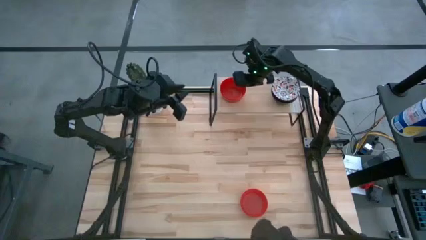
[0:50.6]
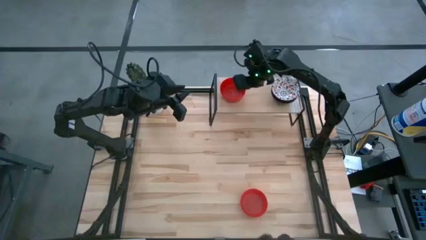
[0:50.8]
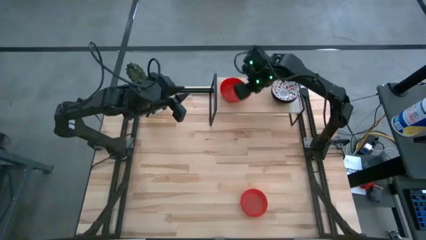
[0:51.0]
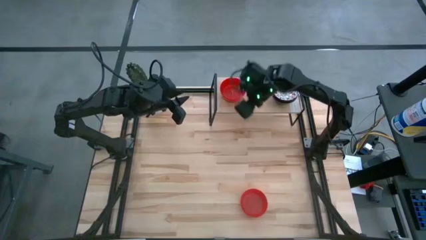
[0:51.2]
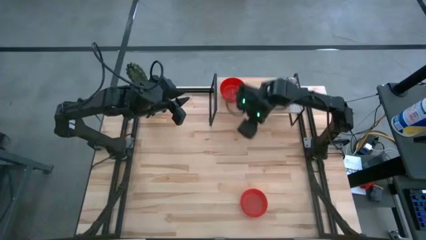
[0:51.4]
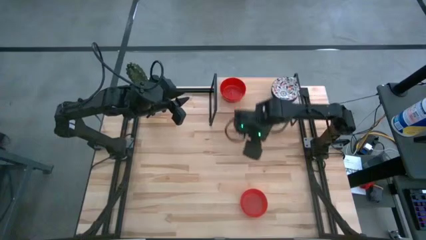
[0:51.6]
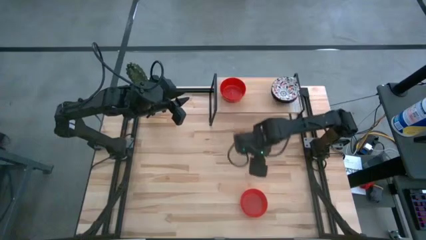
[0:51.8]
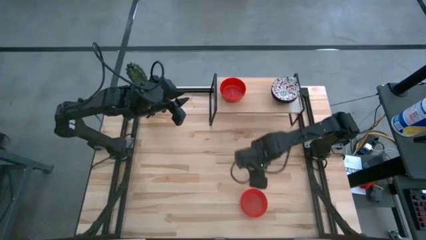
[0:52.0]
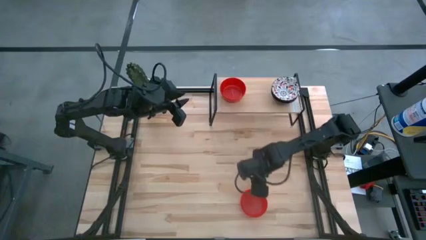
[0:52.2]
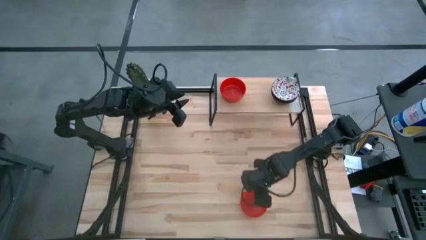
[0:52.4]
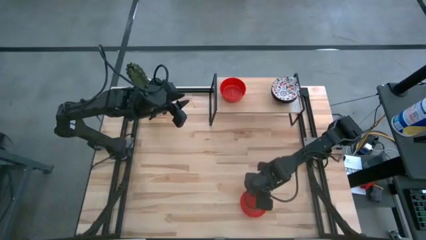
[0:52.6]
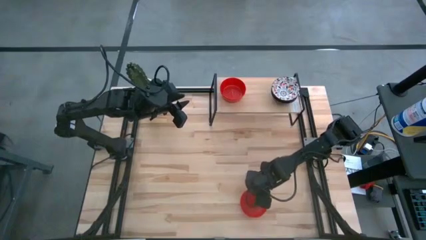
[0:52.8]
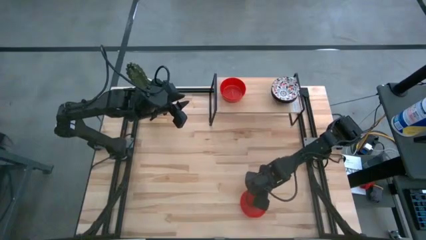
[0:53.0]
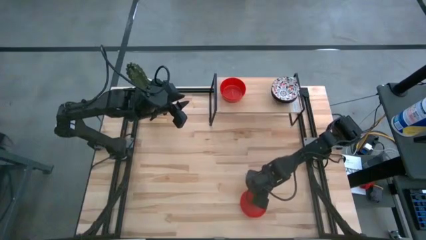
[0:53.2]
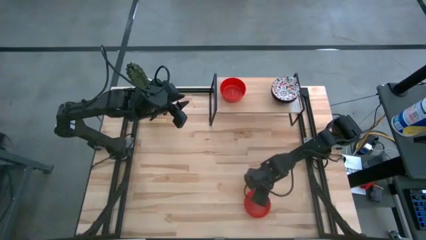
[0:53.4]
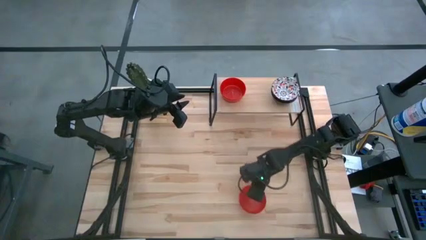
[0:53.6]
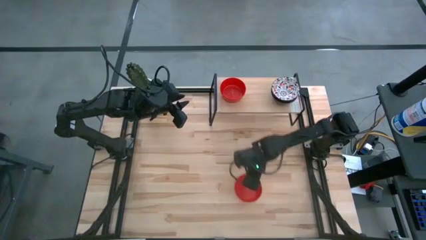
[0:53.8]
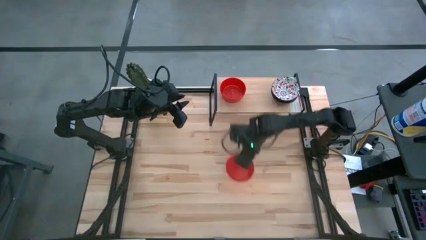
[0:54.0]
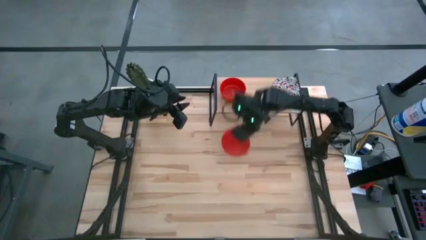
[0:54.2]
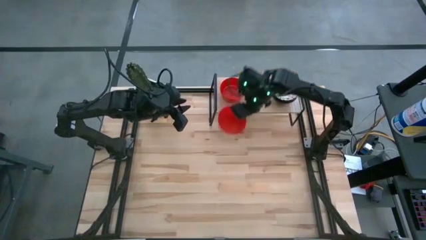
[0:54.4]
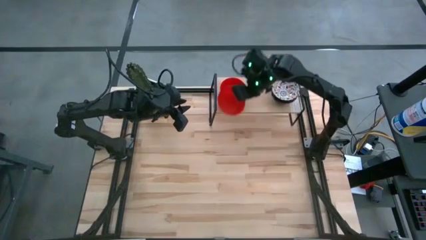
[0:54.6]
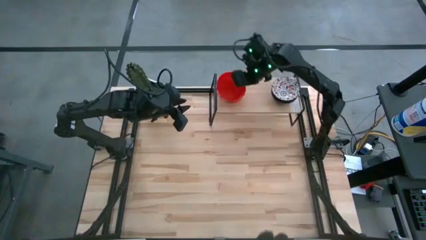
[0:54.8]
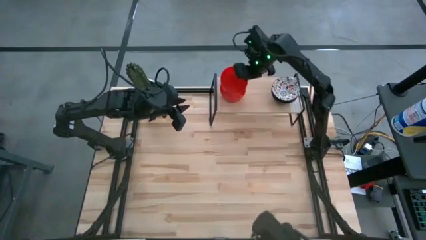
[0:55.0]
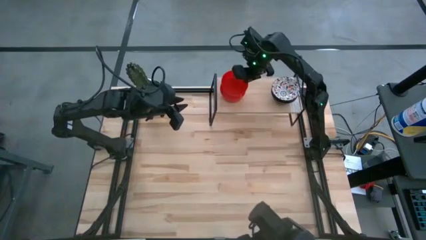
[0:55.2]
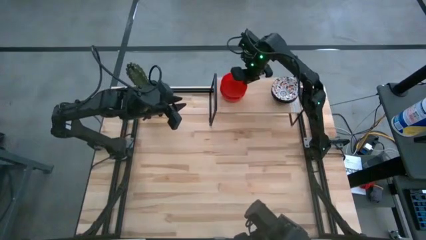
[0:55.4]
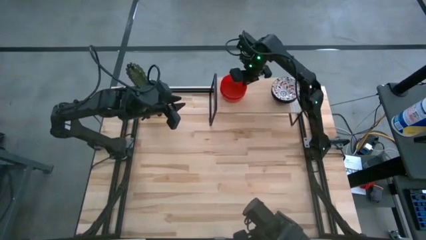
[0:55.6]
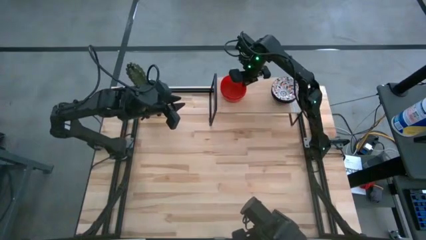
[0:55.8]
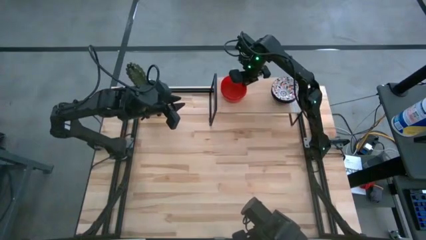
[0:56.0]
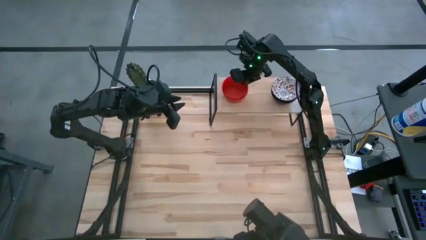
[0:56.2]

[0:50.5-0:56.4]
Task: Pick & Place Mini bowls
Stack the red bowl on the red bowl on the shelf

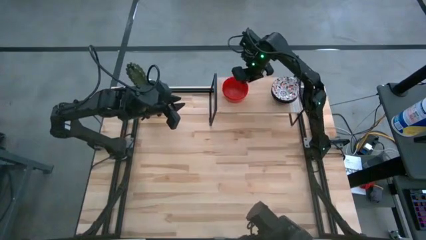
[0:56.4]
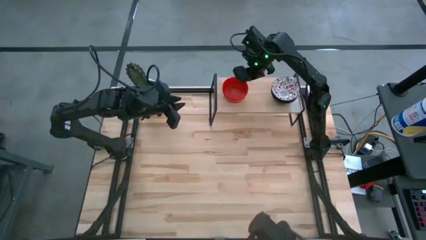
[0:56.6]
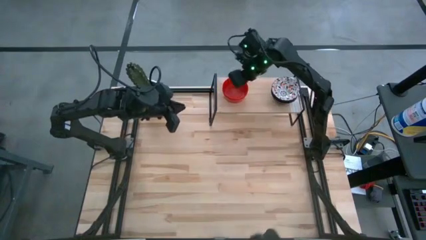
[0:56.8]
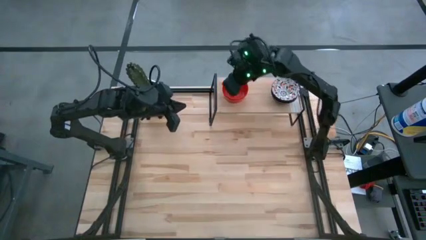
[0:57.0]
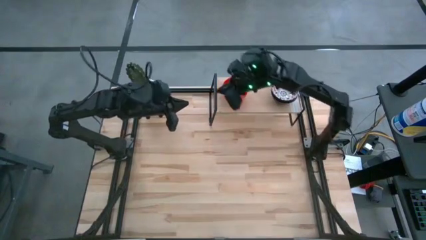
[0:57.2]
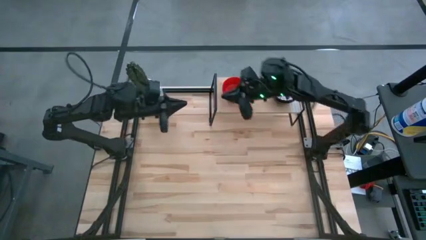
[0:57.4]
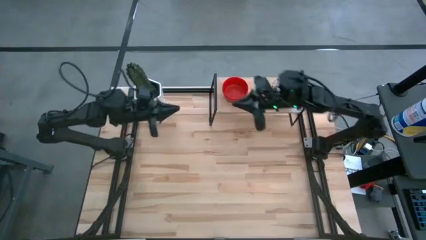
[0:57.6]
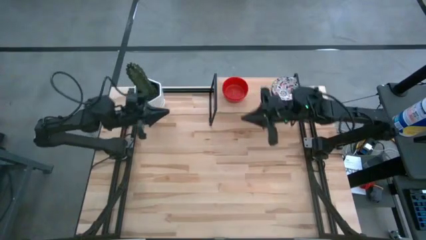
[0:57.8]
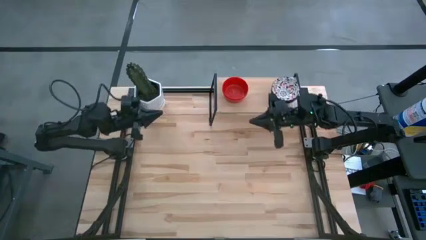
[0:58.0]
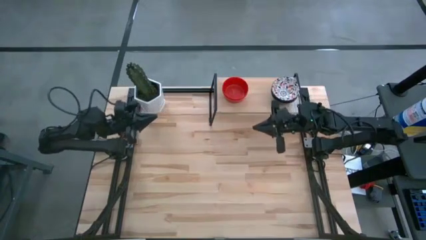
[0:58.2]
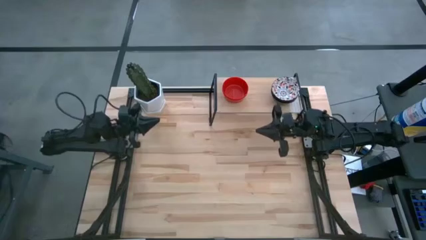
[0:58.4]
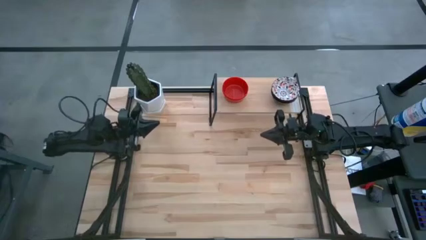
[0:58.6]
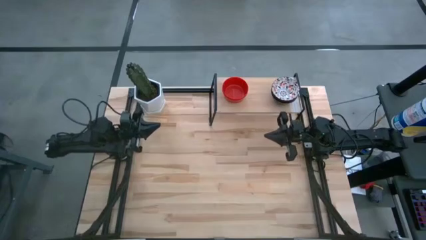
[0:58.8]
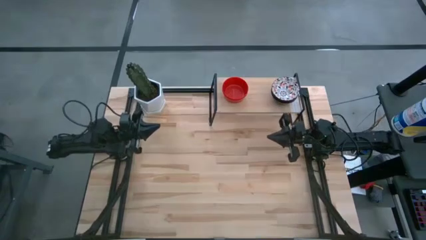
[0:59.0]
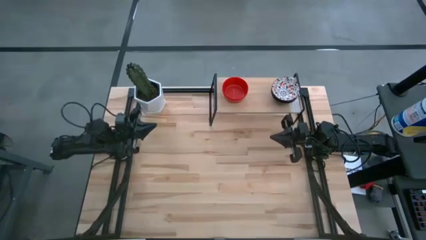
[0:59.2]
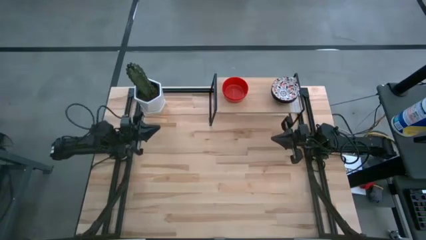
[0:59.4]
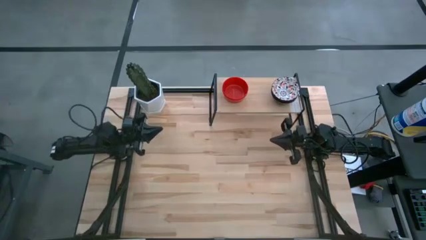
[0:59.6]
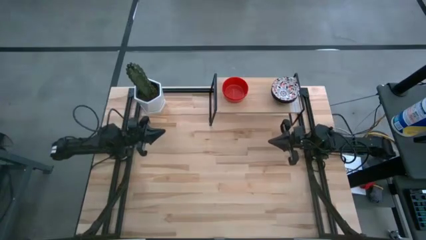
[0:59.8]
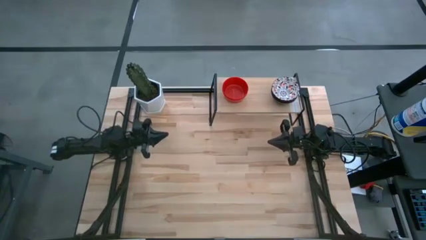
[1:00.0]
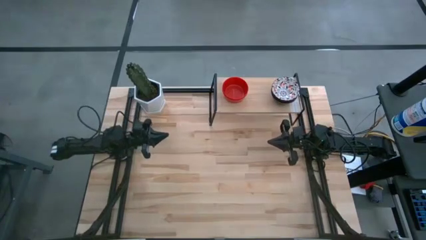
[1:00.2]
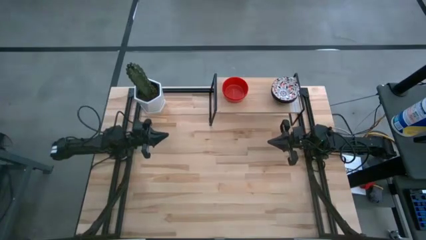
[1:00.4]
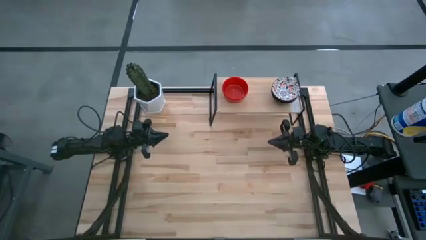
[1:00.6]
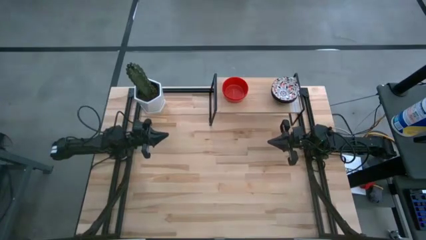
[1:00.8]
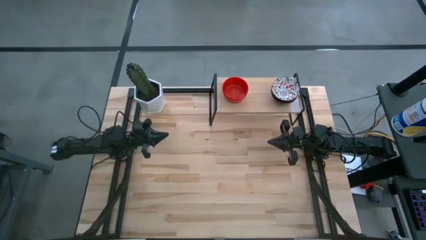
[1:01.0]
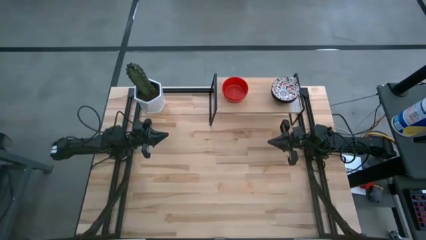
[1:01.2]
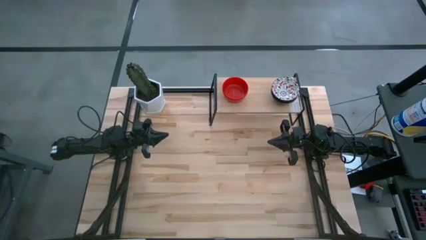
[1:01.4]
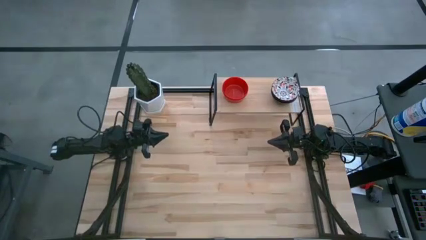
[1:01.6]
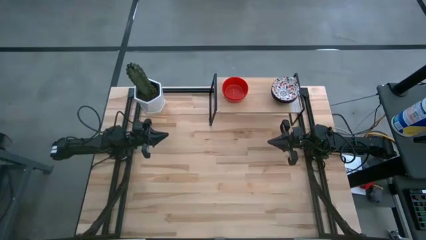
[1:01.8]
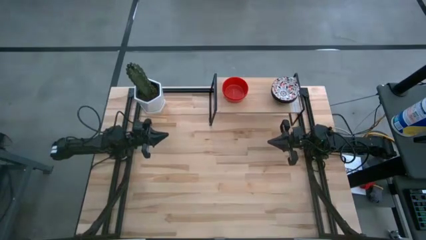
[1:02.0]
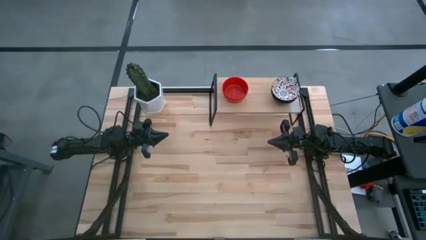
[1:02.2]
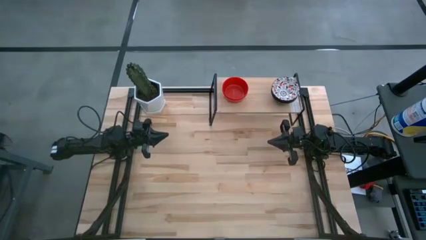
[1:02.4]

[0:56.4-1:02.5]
Return to Home Position
